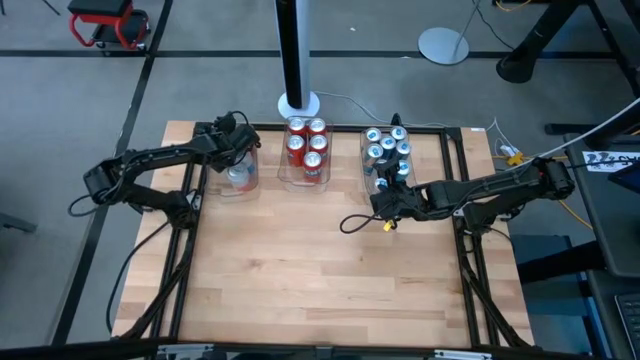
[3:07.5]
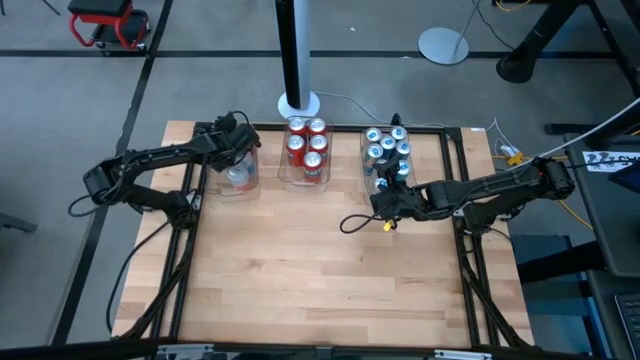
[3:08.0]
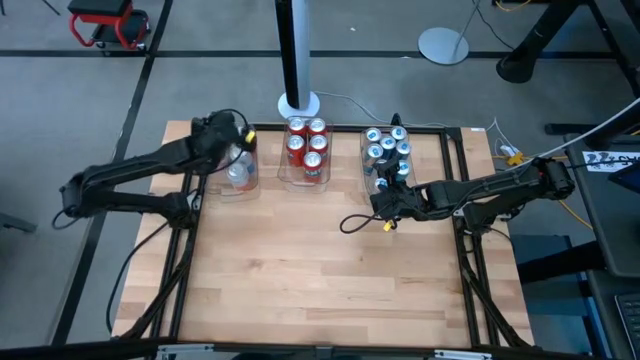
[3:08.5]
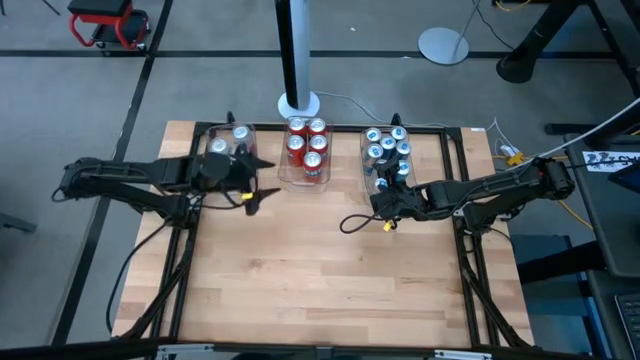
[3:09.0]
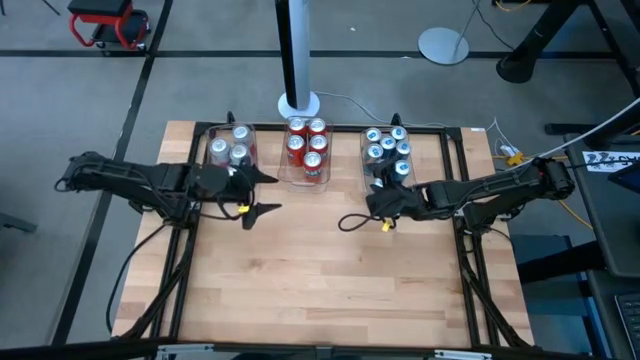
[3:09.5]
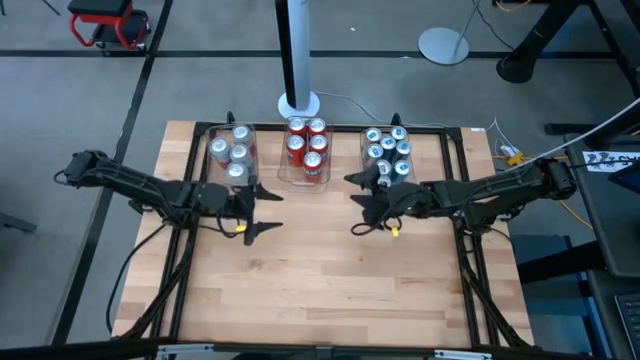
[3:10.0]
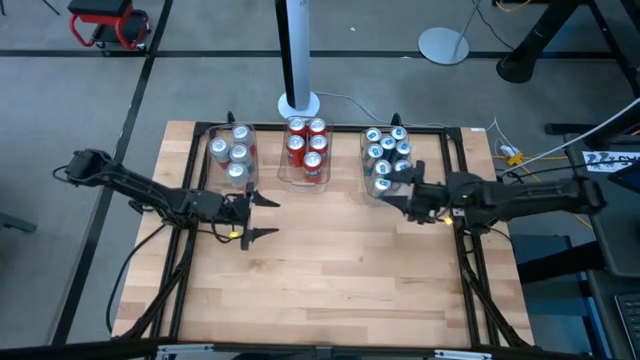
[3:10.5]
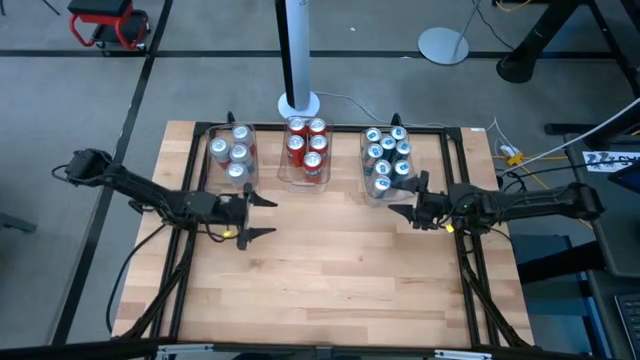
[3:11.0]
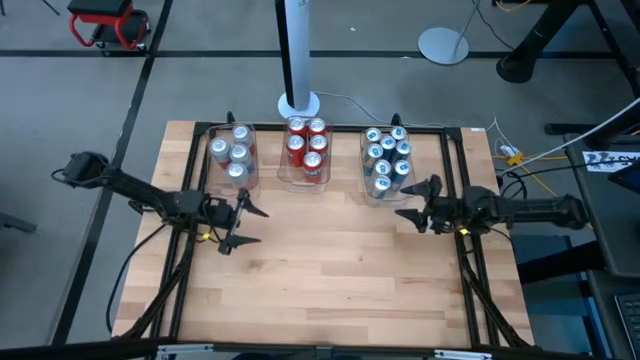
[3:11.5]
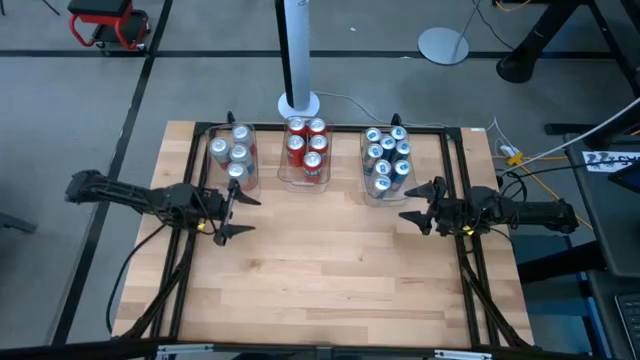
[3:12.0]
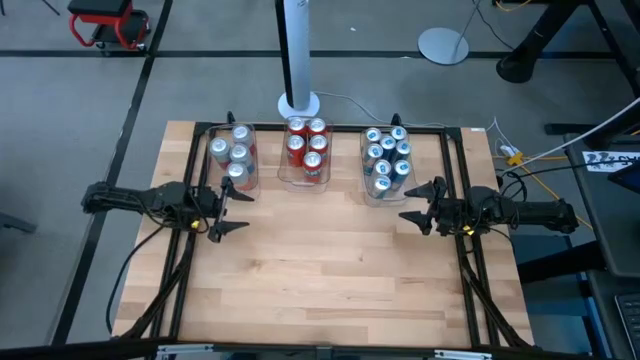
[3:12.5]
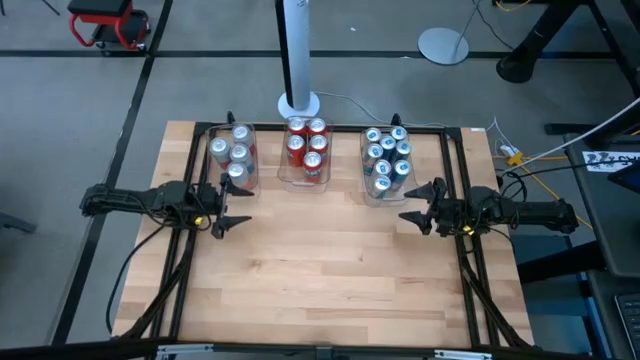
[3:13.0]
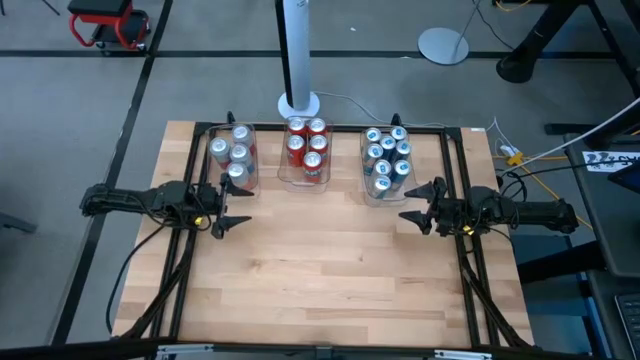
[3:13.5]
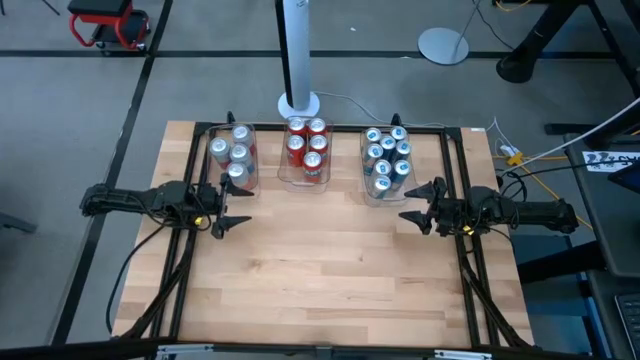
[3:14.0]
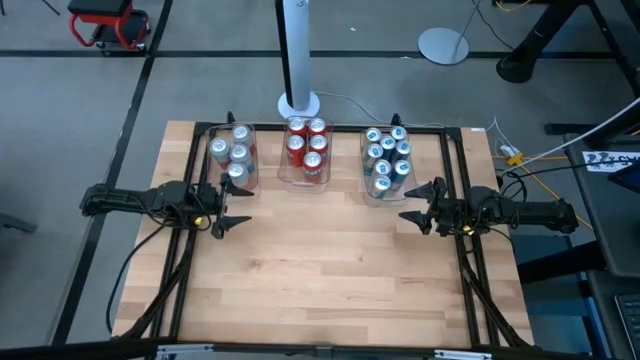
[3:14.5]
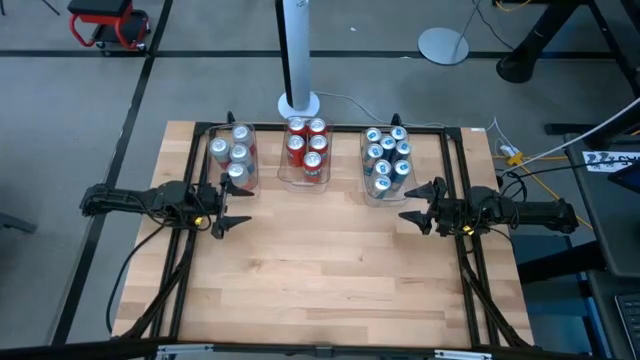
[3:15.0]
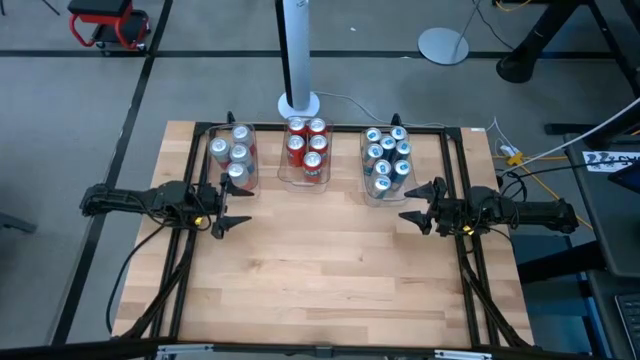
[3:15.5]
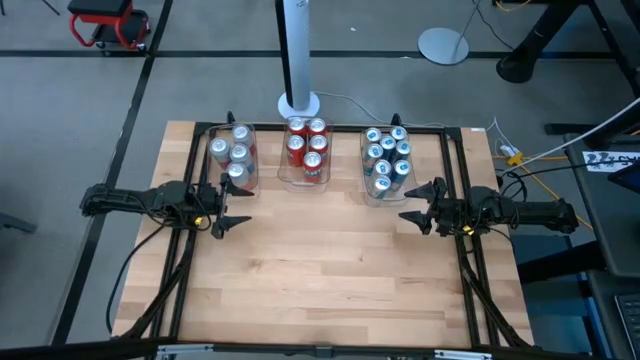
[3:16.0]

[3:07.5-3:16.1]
Task: Sort soda cans
Return to Home Position

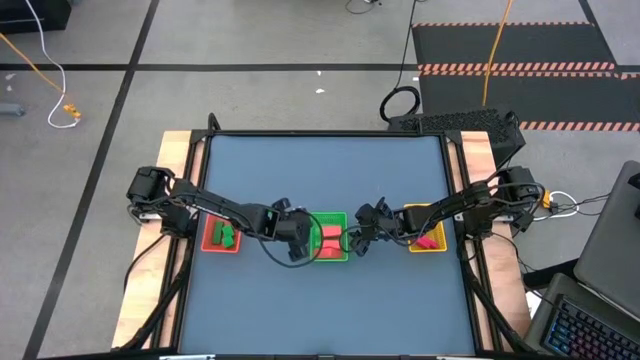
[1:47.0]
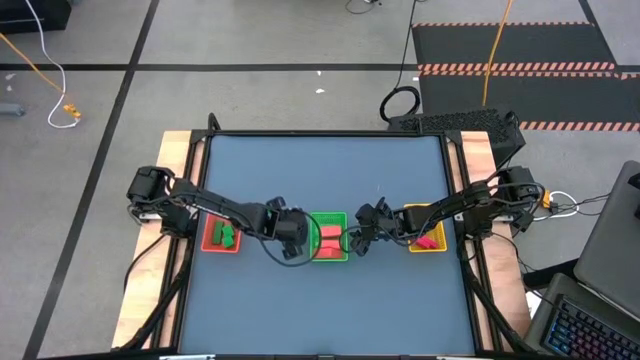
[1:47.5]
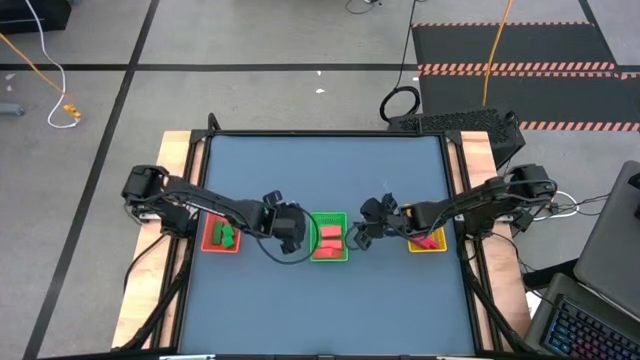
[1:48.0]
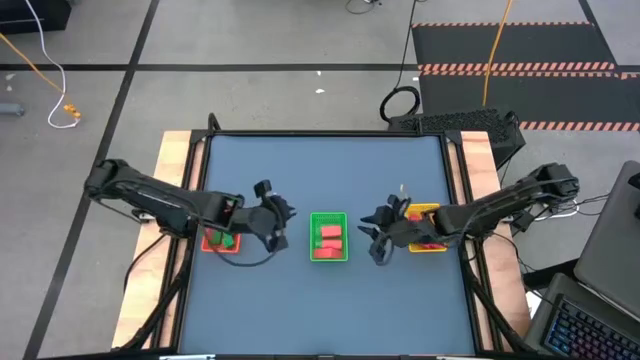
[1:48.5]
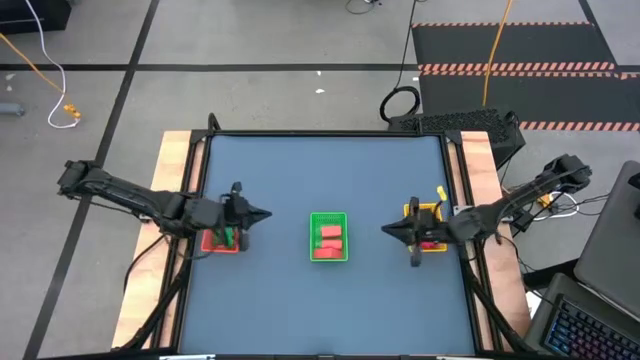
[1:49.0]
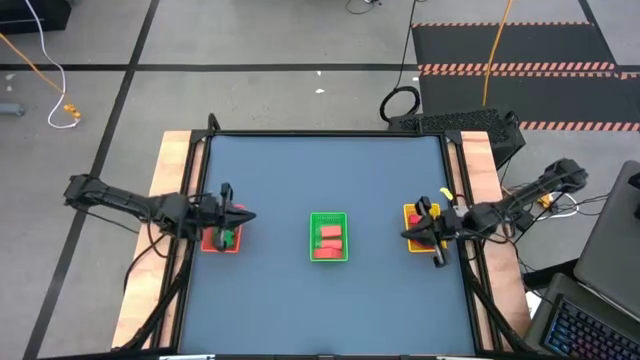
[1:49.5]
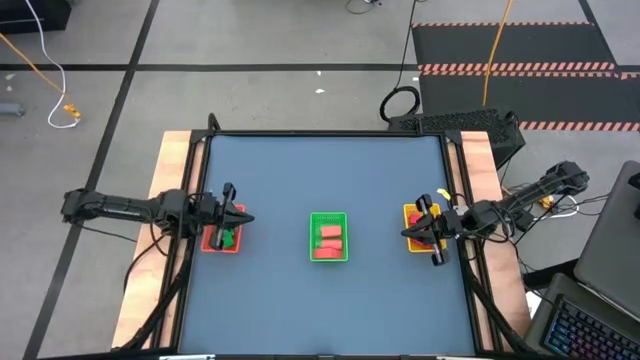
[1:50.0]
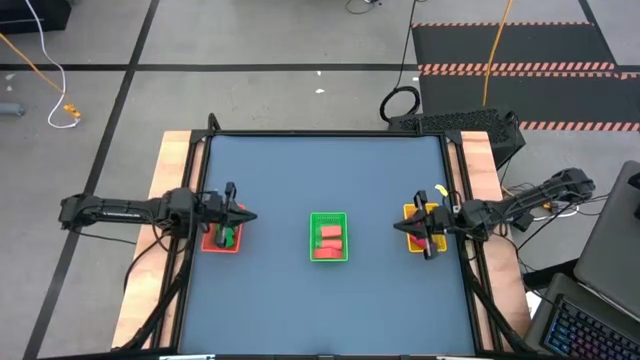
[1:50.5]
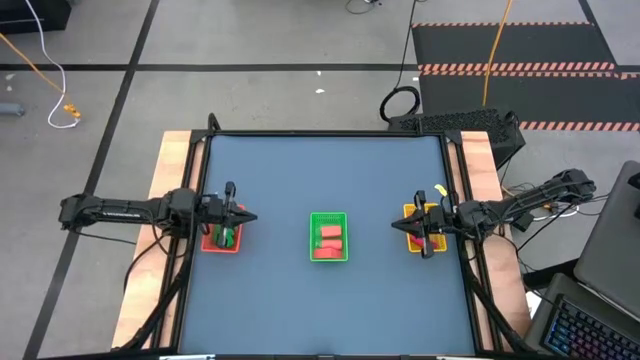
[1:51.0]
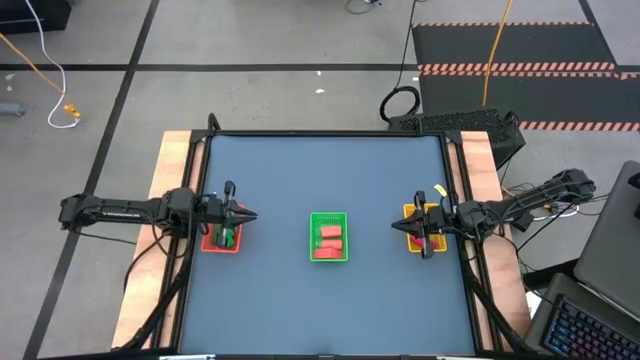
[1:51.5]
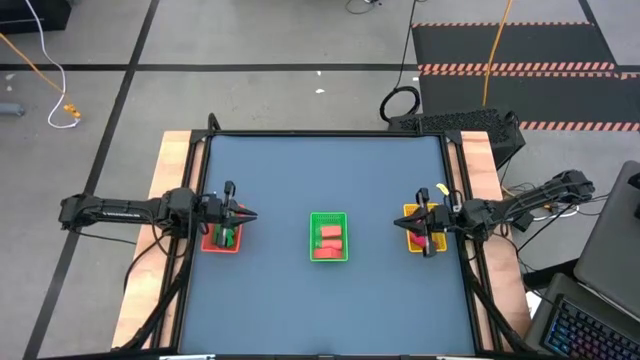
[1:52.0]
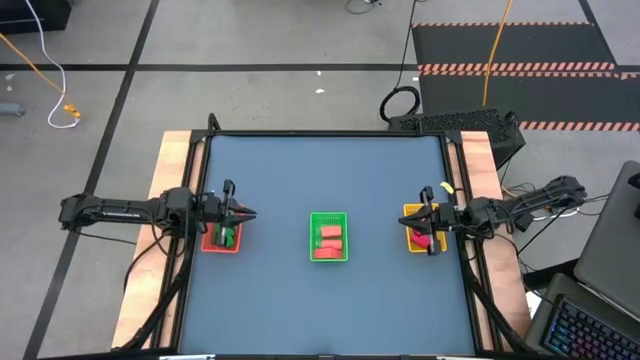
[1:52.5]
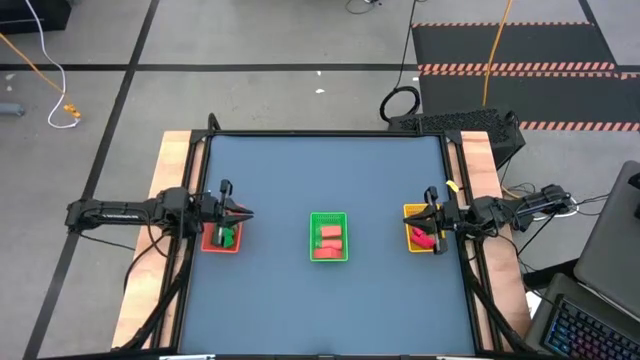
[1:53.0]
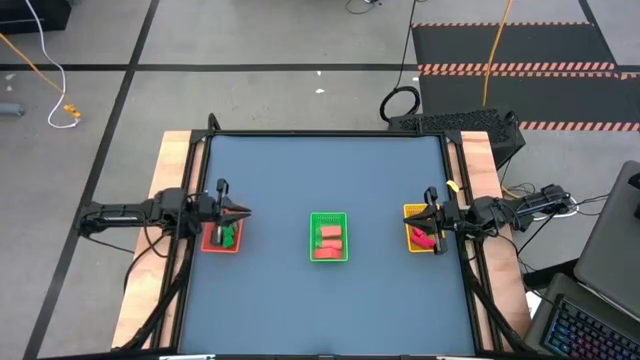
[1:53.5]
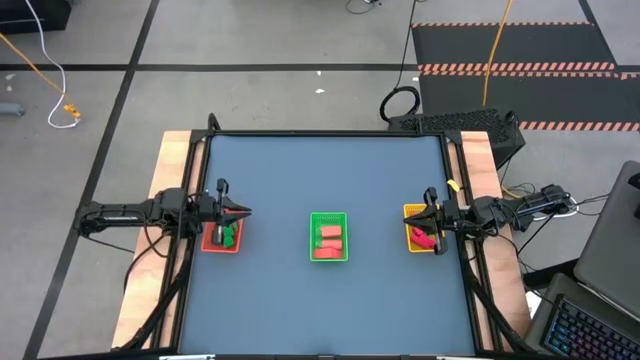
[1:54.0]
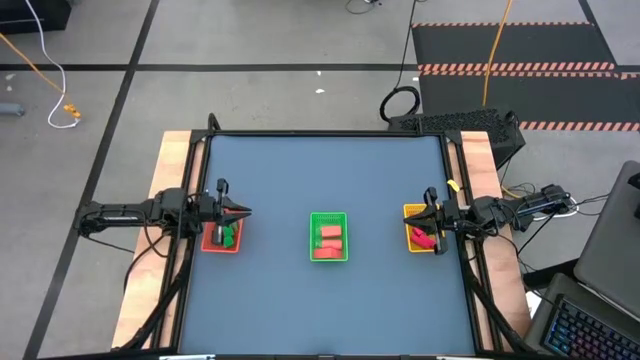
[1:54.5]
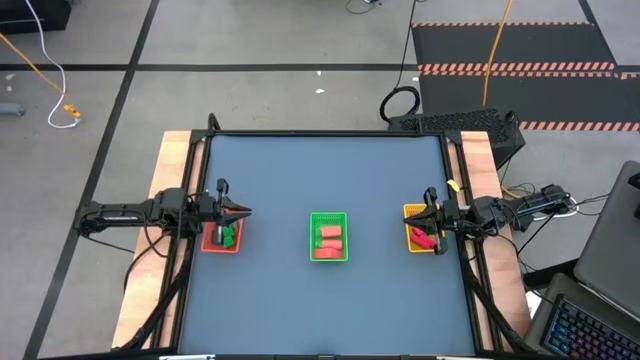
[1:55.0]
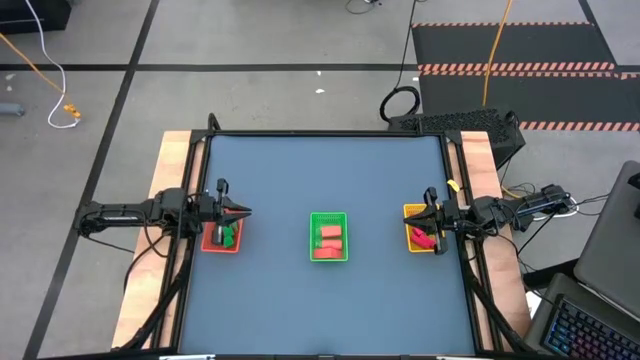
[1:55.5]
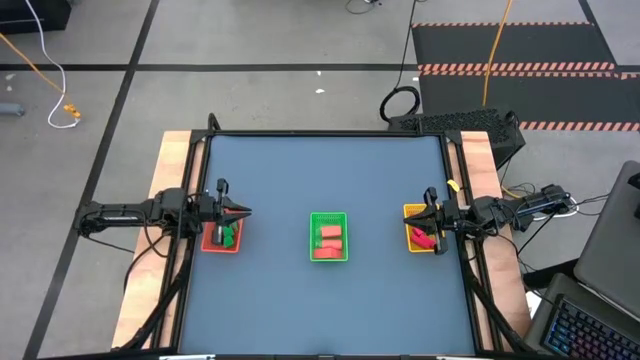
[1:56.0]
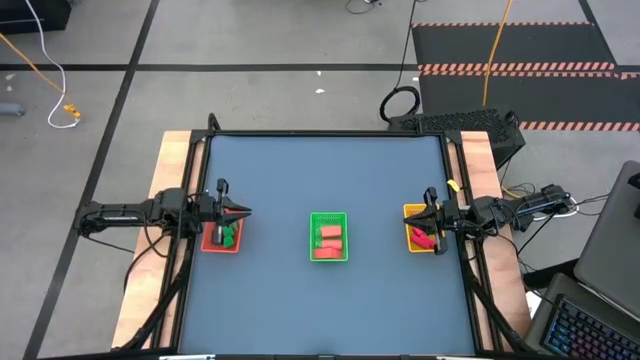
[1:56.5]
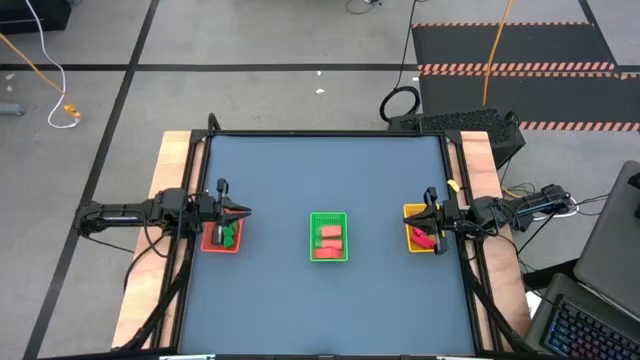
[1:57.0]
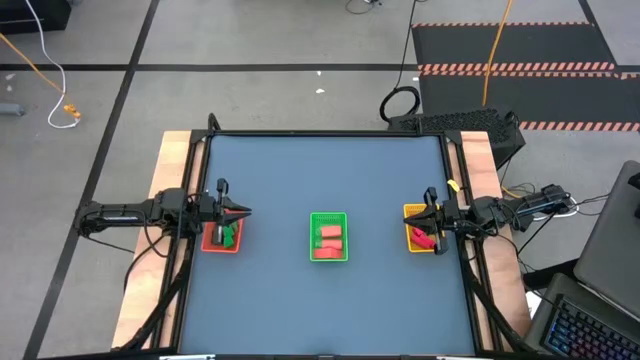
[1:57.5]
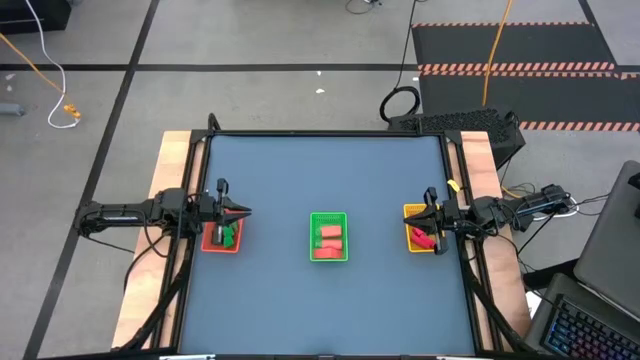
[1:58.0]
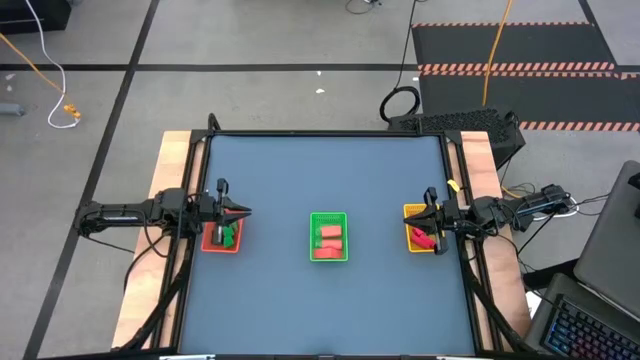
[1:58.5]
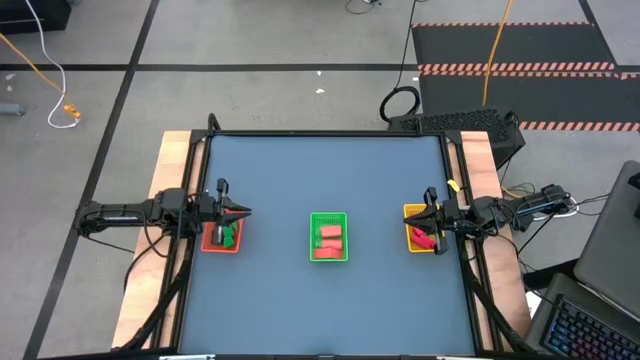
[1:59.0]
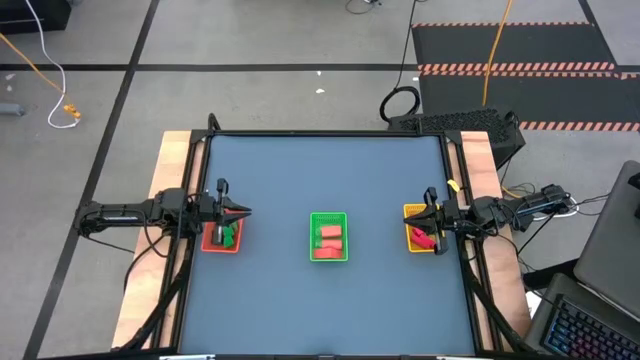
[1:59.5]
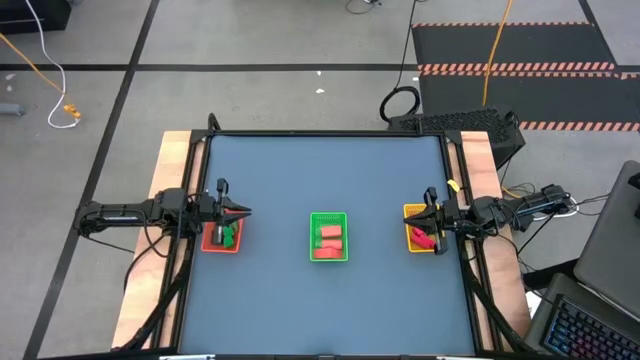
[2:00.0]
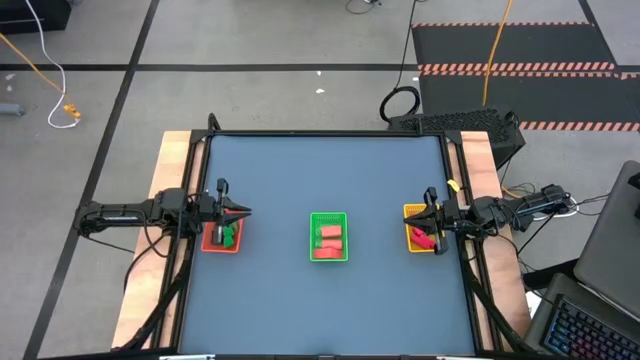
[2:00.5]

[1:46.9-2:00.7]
Task: Sort & place blocks by color
Return to Home Position
